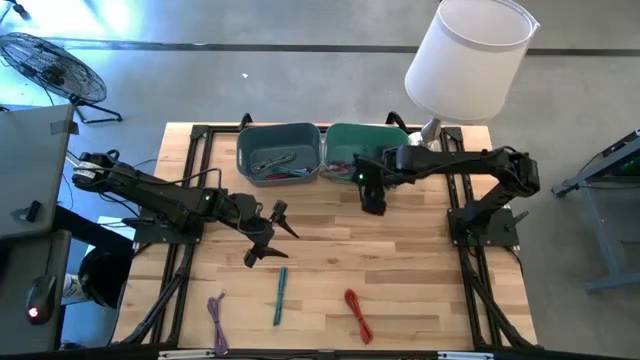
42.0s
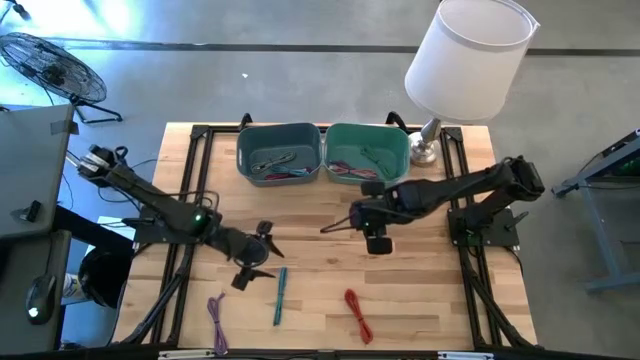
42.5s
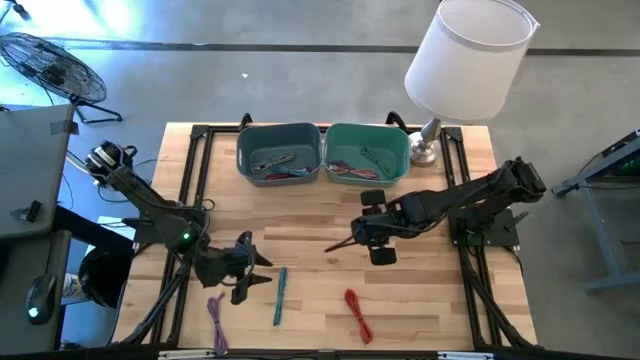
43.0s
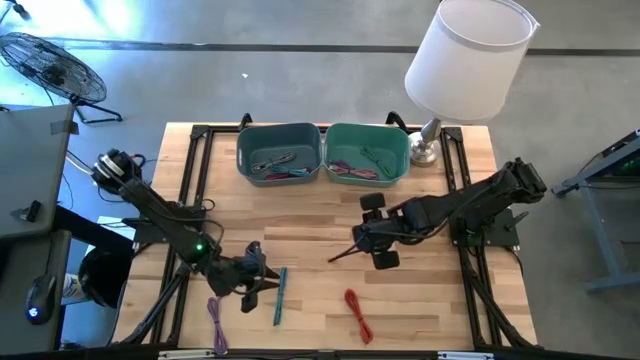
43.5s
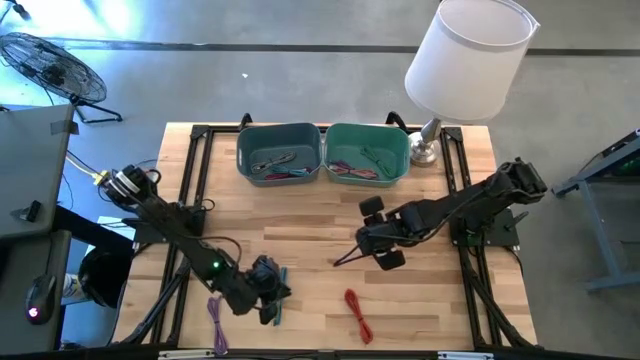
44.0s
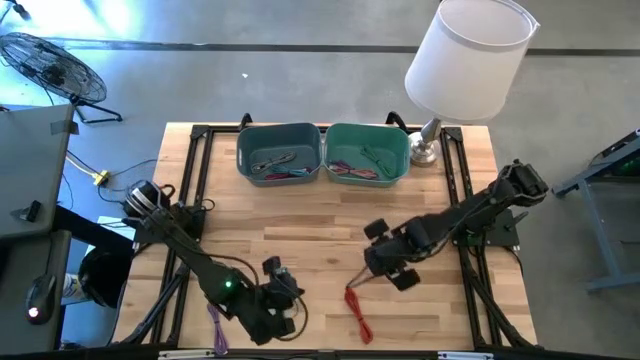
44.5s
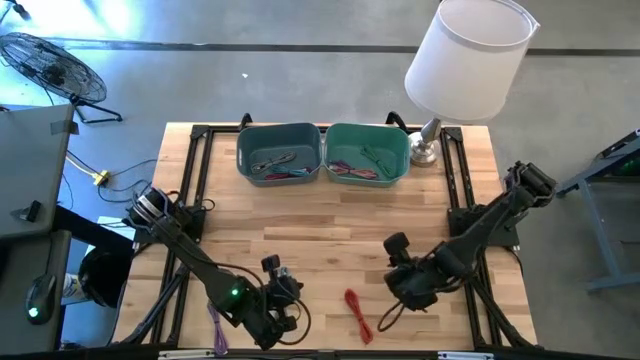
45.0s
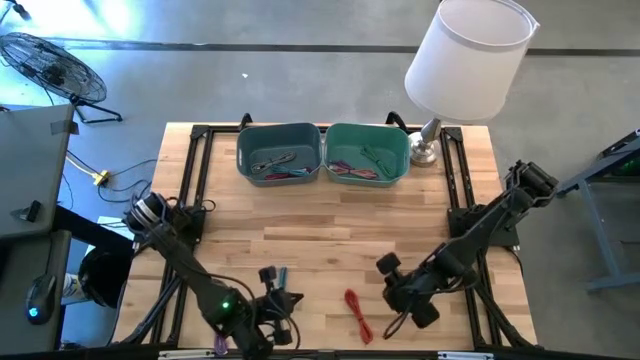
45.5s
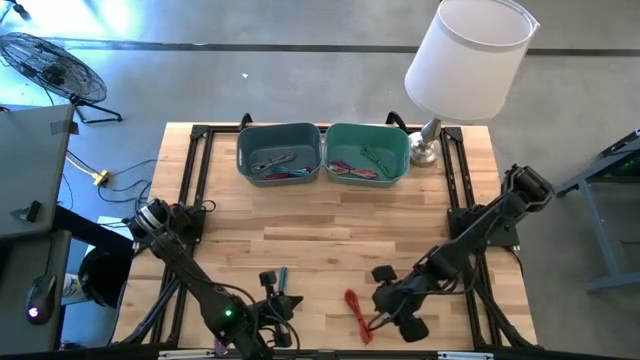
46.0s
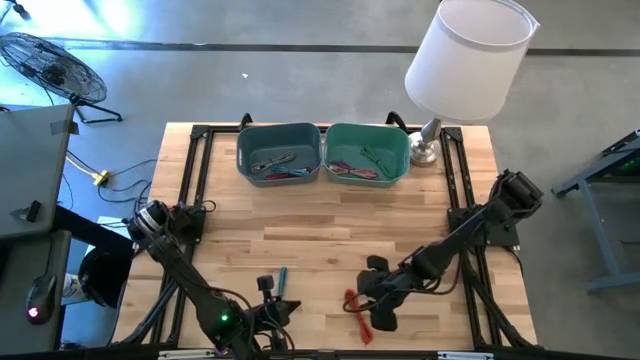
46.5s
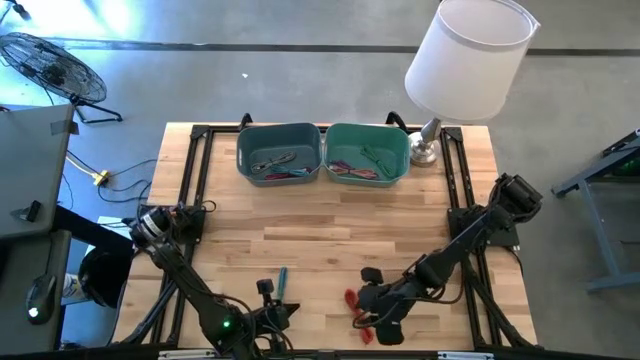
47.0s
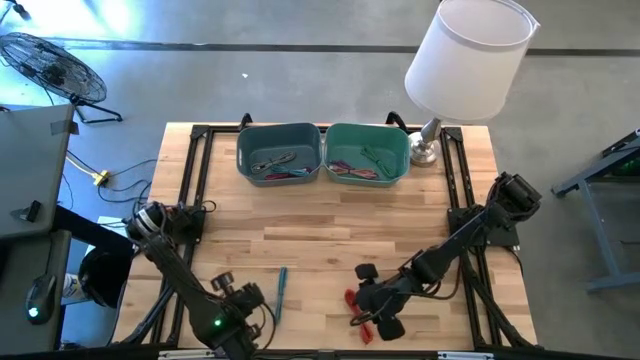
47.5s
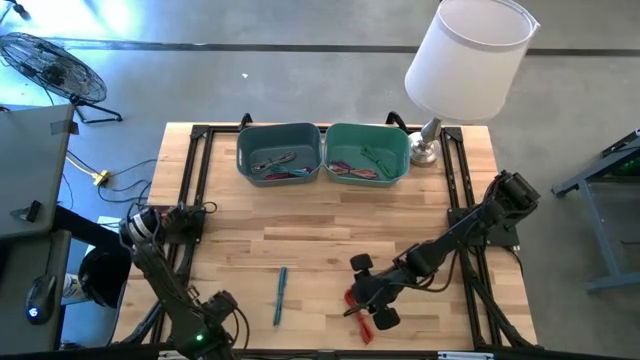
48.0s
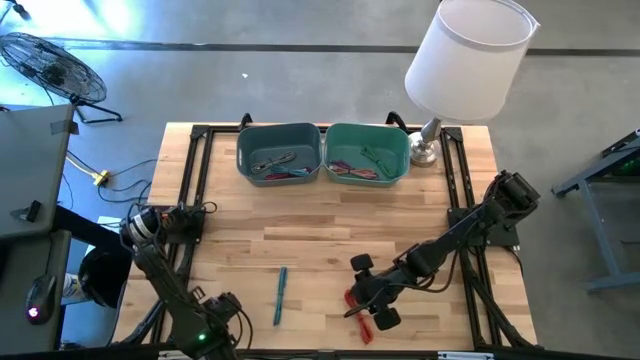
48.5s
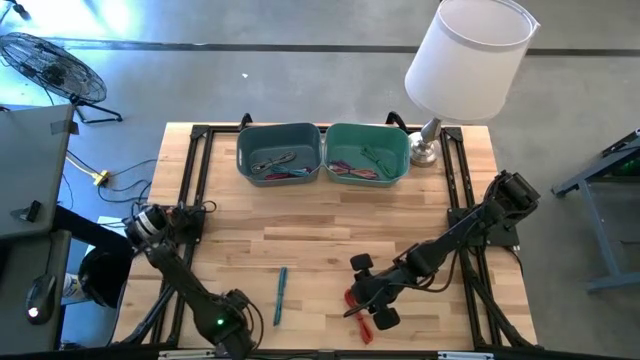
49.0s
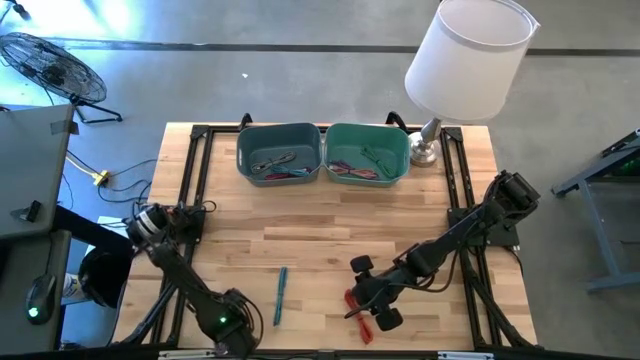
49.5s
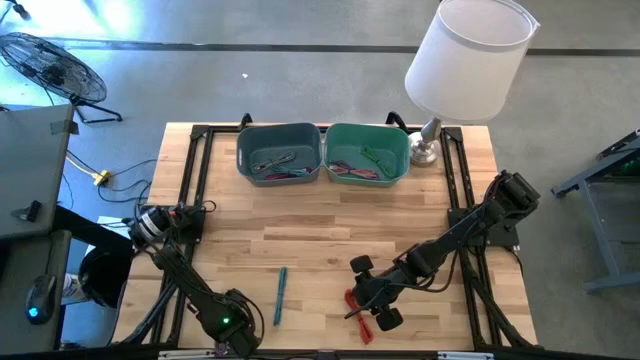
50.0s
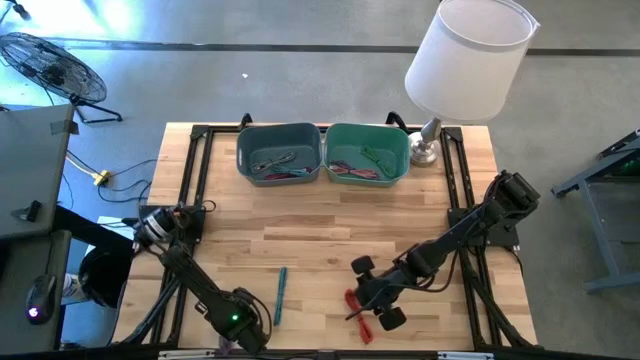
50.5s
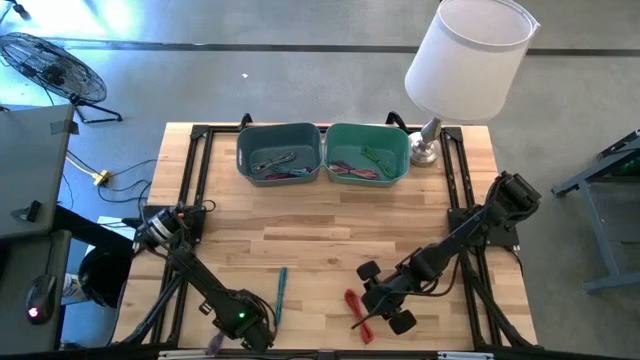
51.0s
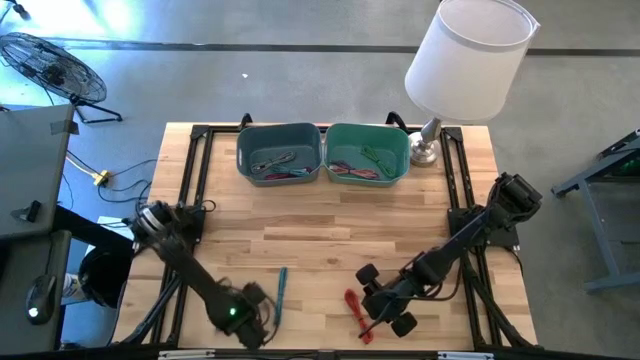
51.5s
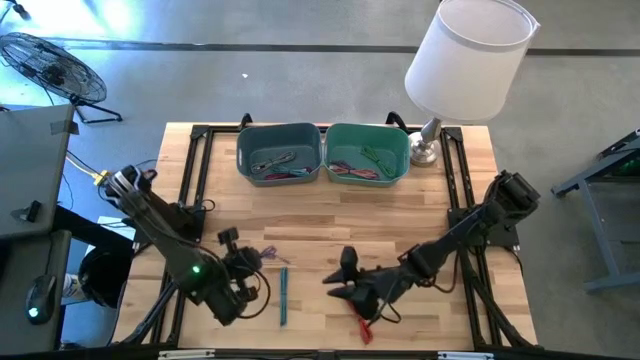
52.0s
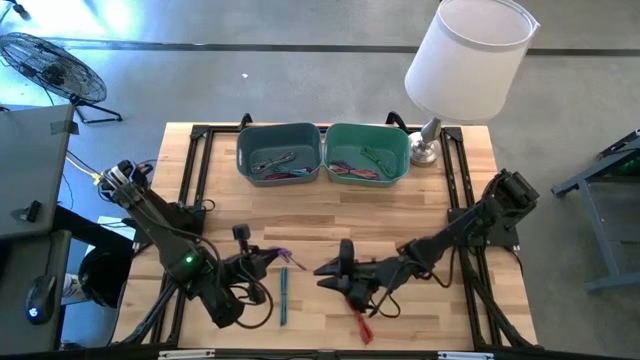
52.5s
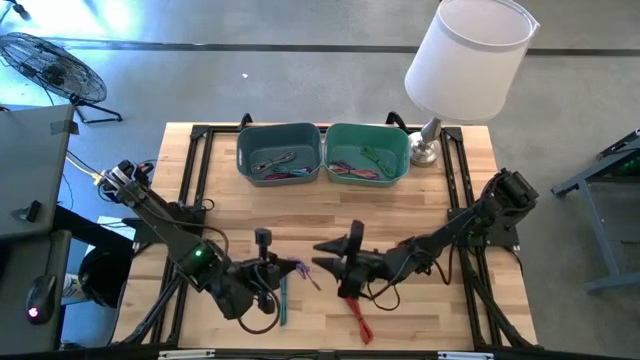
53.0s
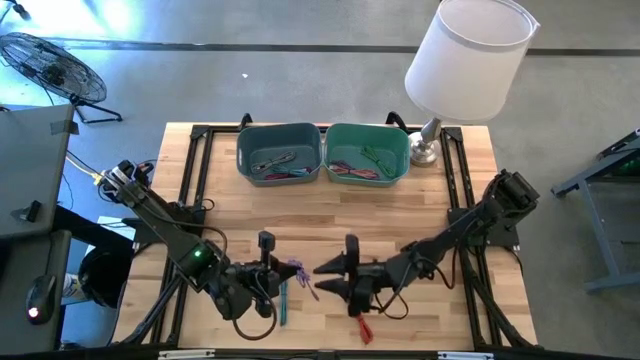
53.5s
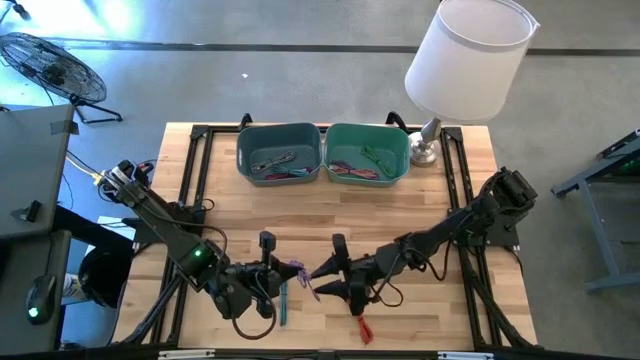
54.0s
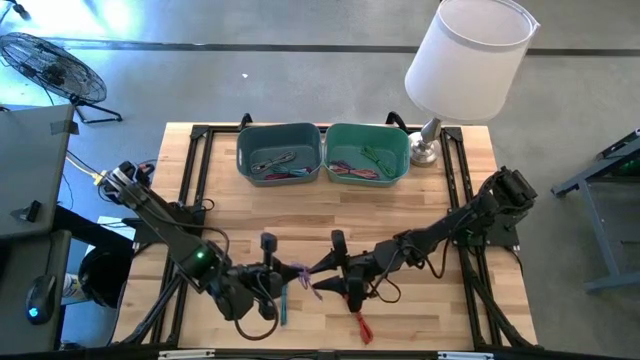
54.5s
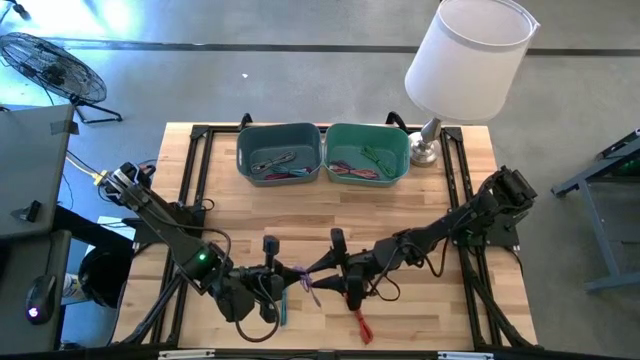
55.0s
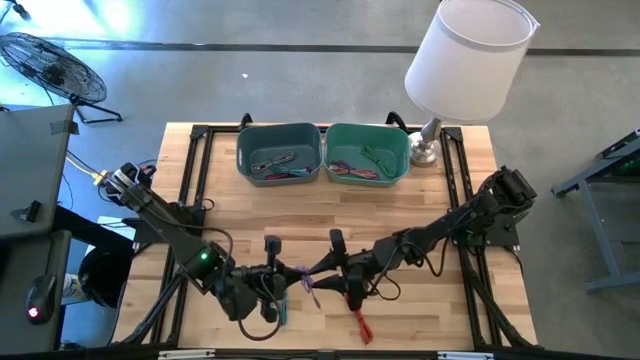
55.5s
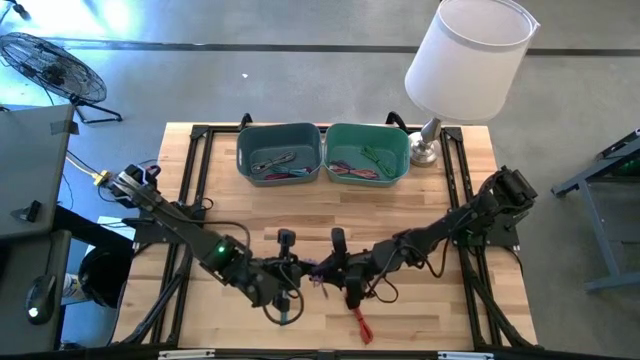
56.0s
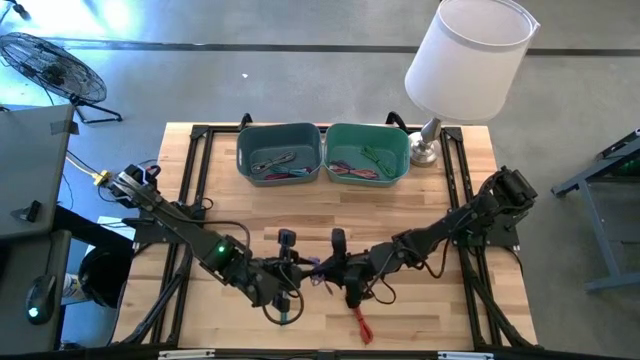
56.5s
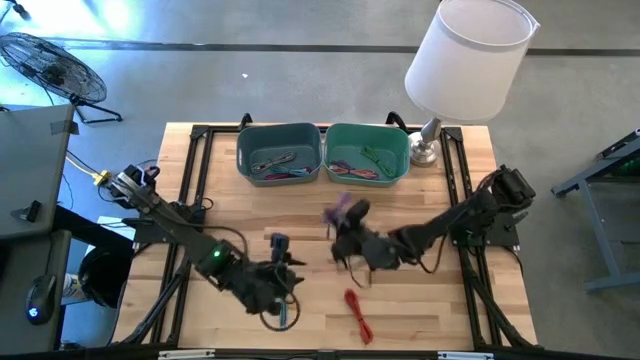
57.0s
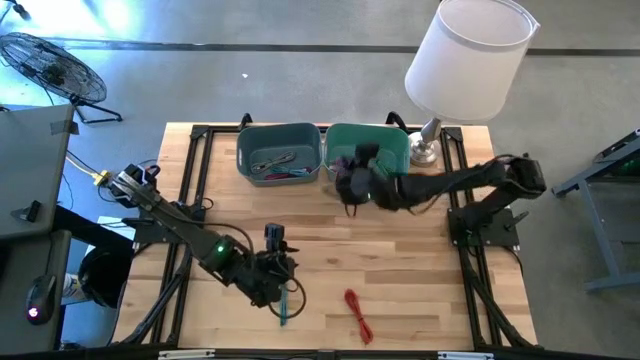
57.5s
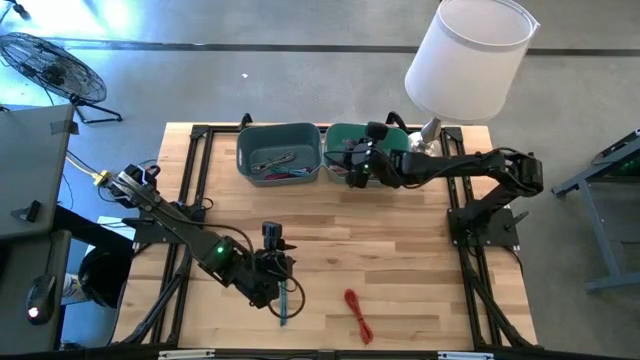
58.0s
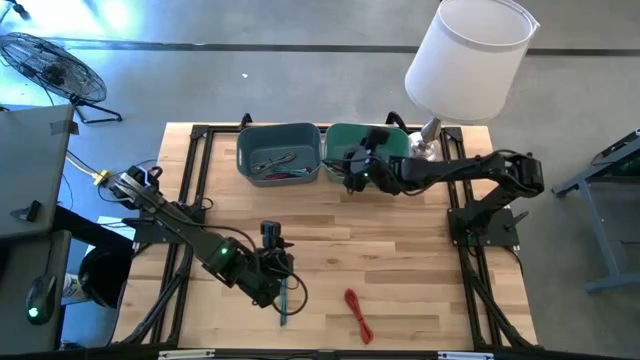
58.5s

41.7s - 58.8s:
Task: Pick & Place USB Port
Put the purple USB cable into the green bin

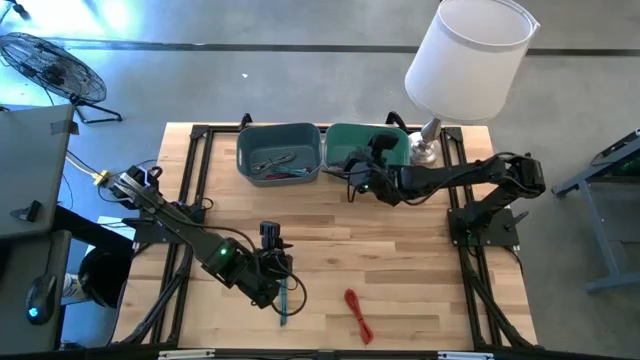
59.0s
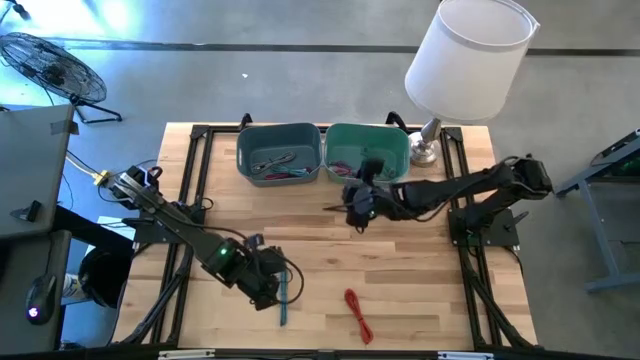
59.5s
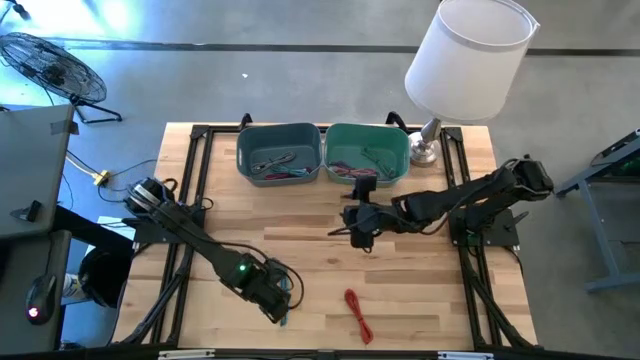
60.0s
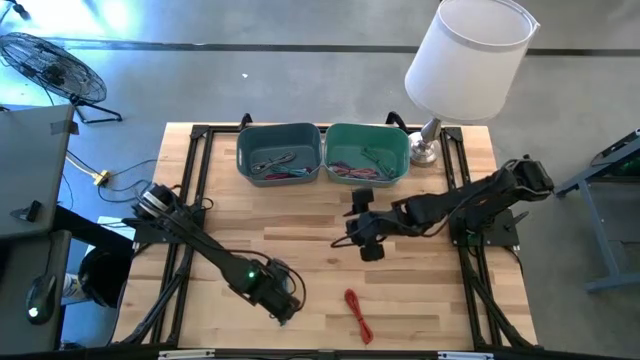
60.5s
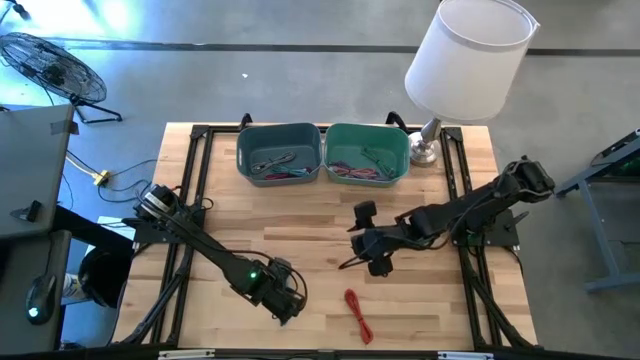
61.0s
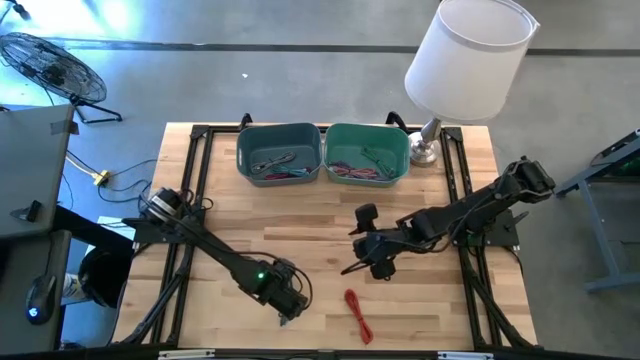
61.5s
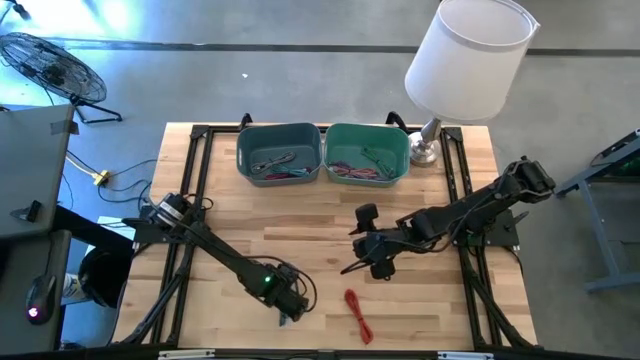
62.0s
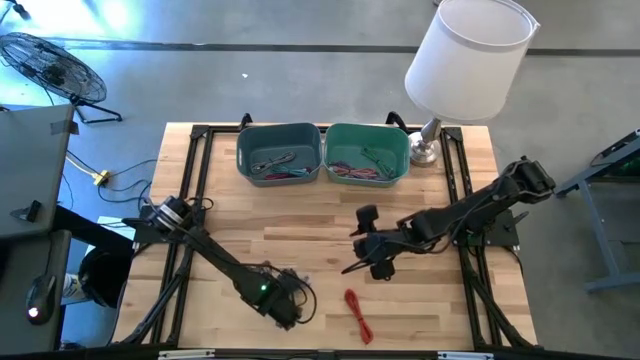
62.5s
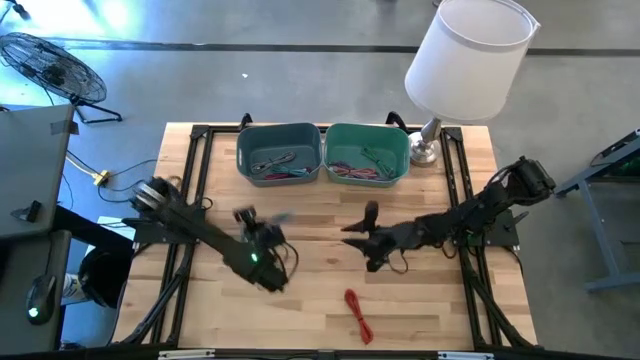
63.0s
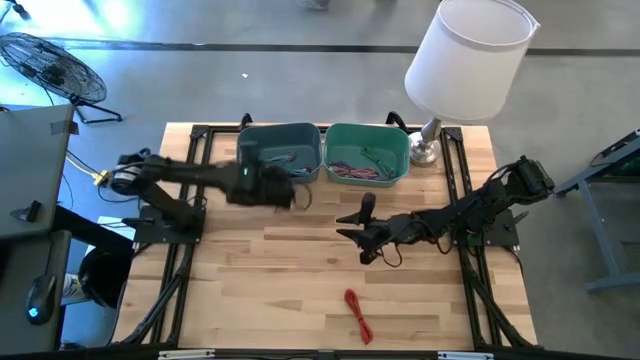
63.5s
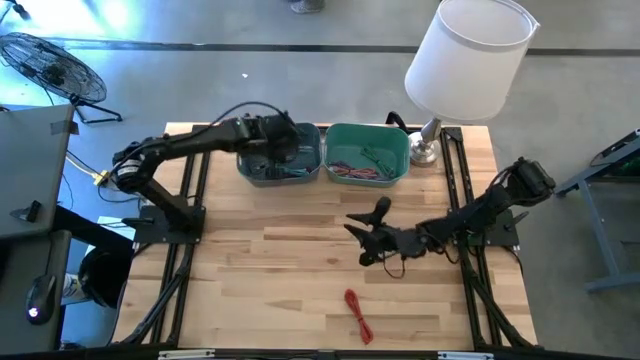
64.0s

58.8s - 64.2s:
Put the blue patterned USB cable into the blue bin
